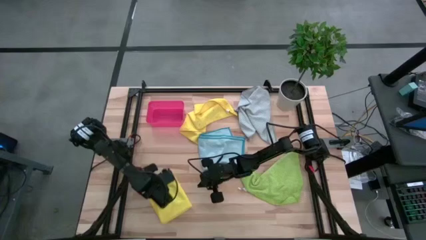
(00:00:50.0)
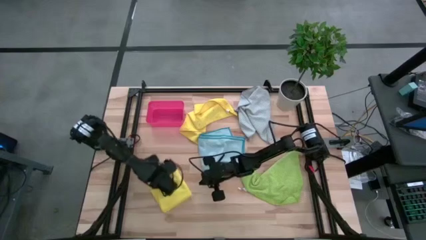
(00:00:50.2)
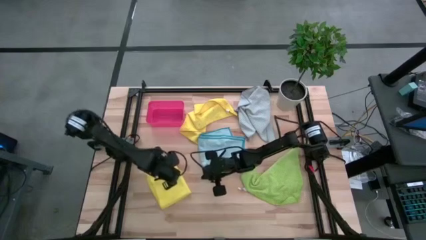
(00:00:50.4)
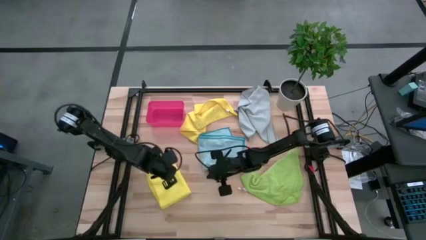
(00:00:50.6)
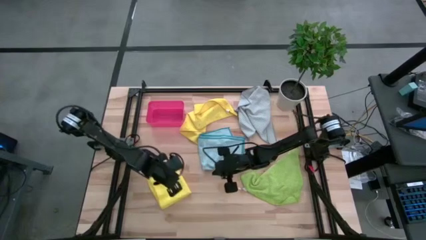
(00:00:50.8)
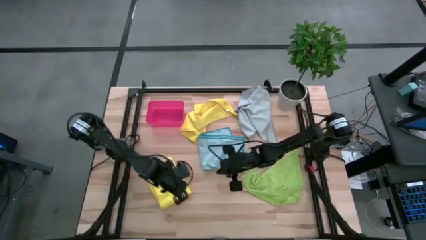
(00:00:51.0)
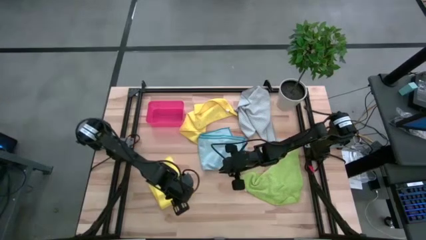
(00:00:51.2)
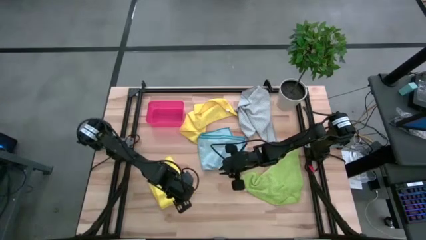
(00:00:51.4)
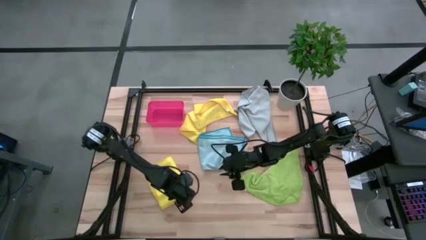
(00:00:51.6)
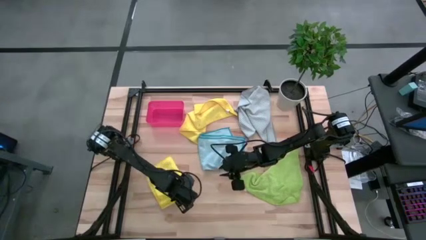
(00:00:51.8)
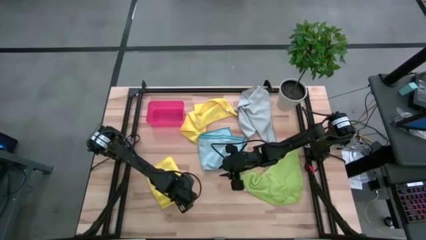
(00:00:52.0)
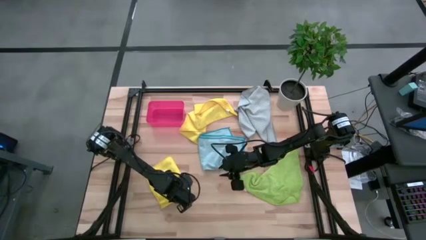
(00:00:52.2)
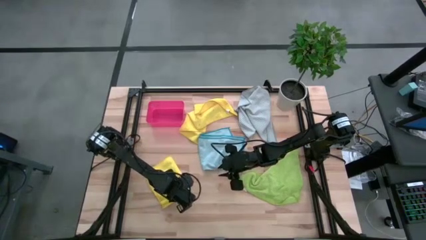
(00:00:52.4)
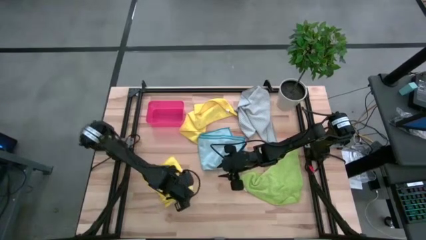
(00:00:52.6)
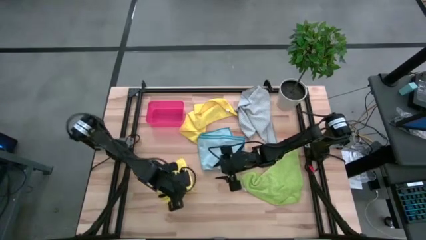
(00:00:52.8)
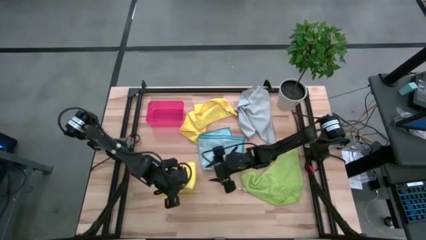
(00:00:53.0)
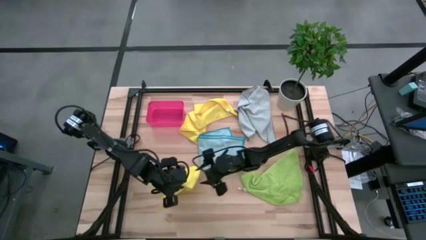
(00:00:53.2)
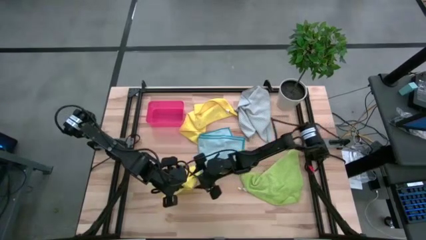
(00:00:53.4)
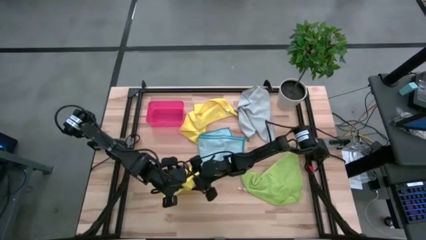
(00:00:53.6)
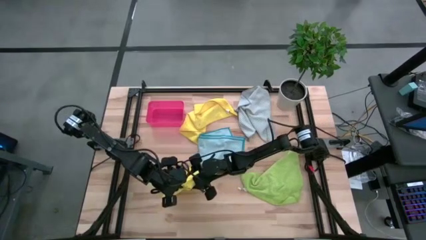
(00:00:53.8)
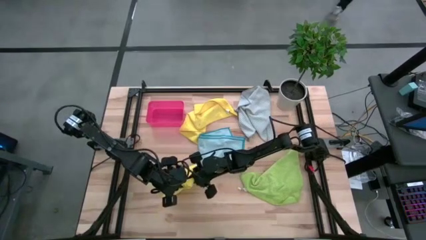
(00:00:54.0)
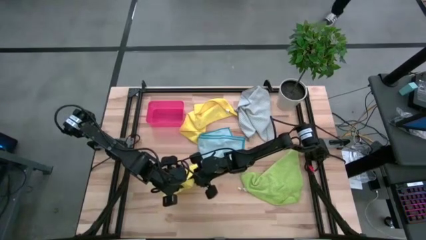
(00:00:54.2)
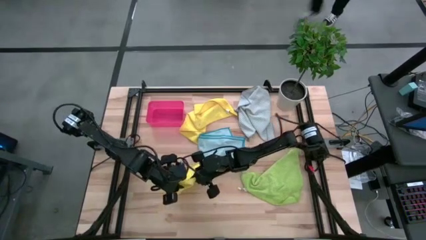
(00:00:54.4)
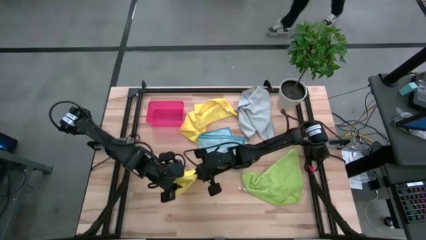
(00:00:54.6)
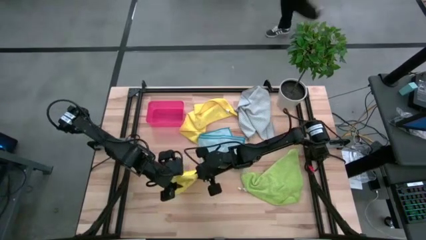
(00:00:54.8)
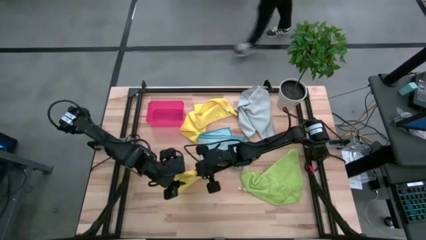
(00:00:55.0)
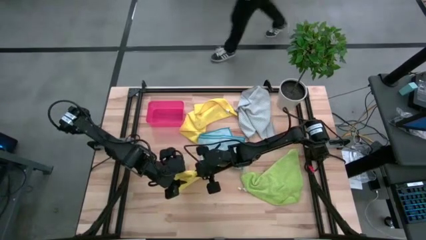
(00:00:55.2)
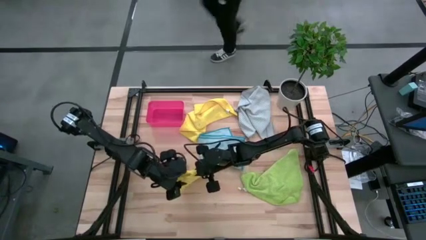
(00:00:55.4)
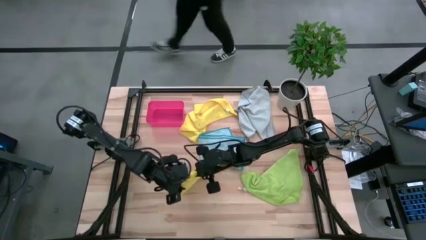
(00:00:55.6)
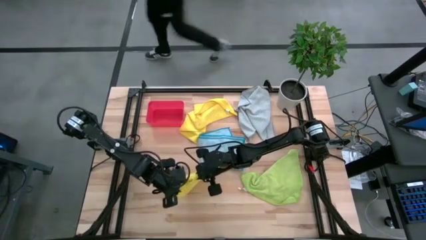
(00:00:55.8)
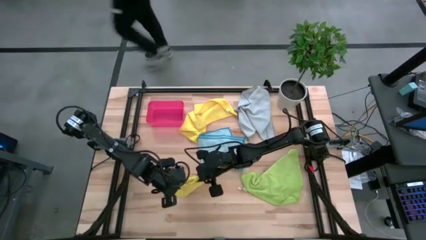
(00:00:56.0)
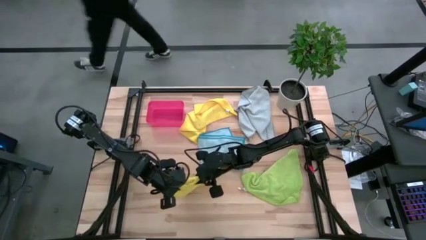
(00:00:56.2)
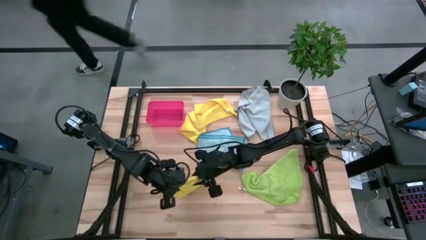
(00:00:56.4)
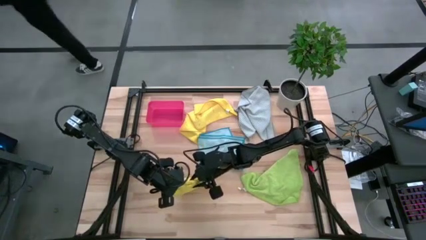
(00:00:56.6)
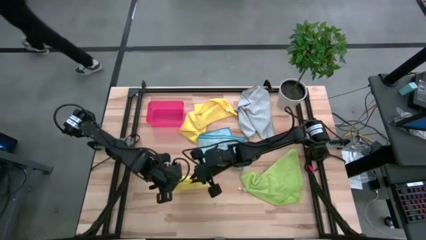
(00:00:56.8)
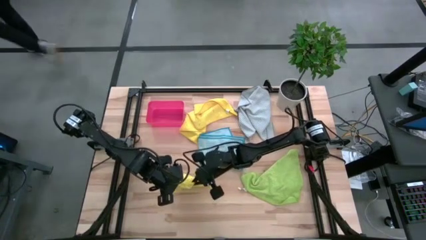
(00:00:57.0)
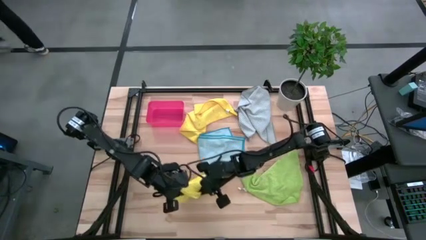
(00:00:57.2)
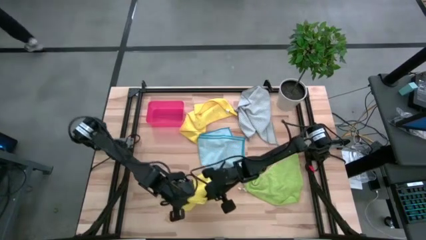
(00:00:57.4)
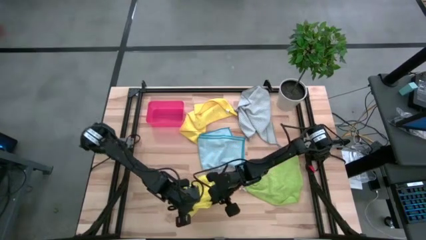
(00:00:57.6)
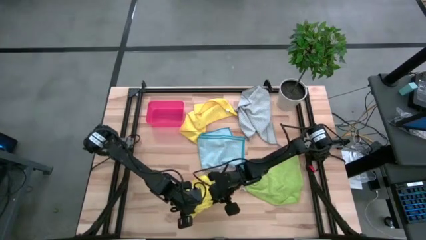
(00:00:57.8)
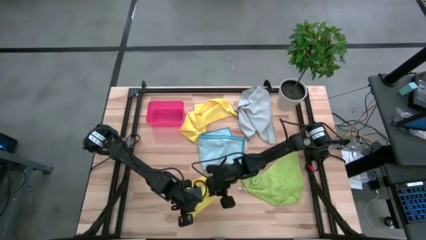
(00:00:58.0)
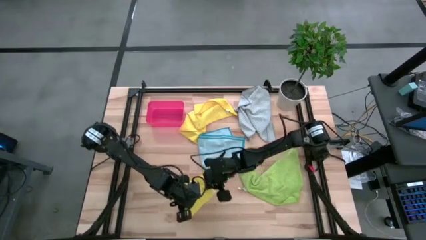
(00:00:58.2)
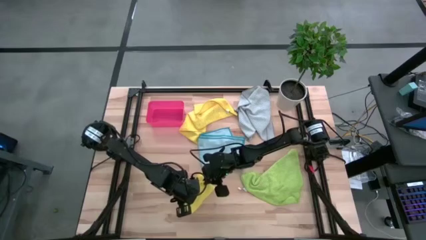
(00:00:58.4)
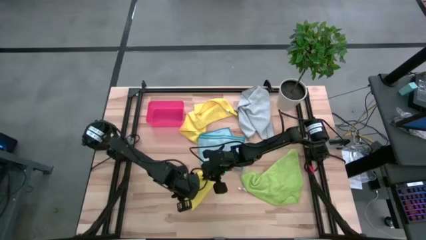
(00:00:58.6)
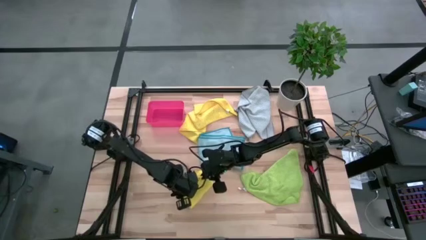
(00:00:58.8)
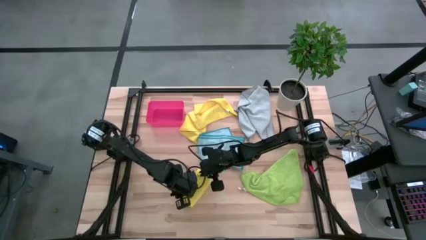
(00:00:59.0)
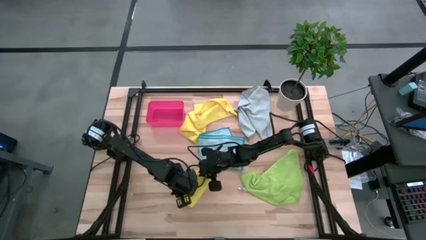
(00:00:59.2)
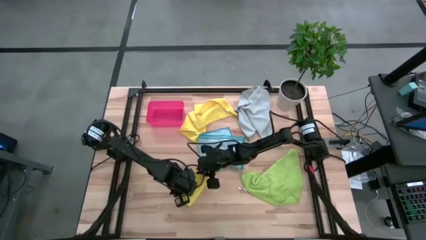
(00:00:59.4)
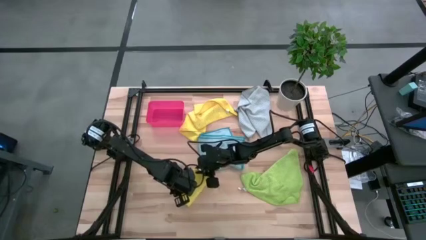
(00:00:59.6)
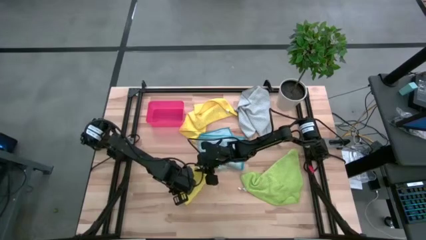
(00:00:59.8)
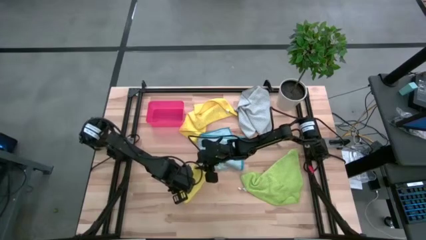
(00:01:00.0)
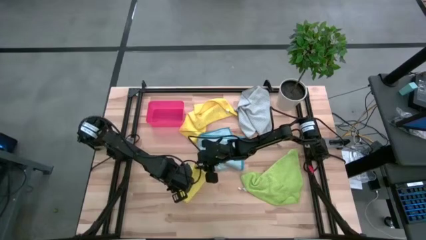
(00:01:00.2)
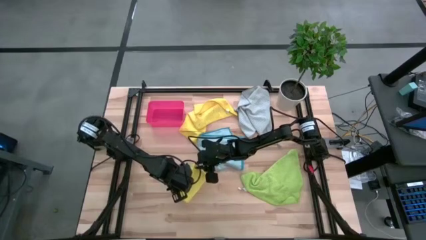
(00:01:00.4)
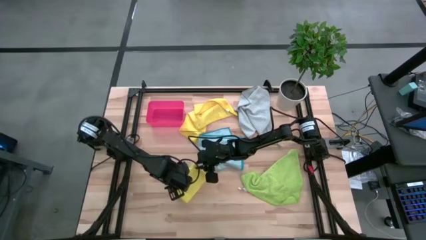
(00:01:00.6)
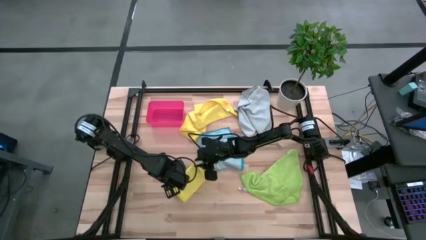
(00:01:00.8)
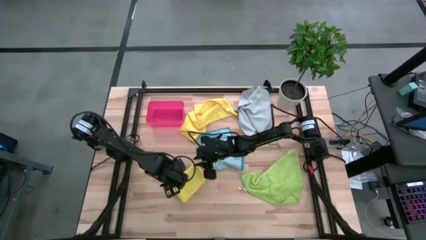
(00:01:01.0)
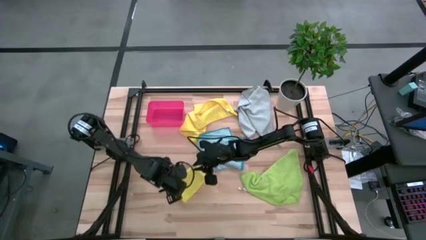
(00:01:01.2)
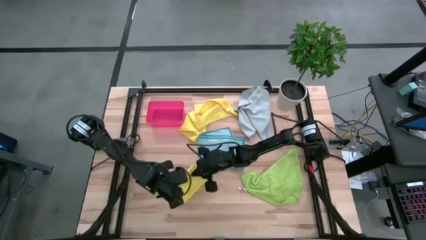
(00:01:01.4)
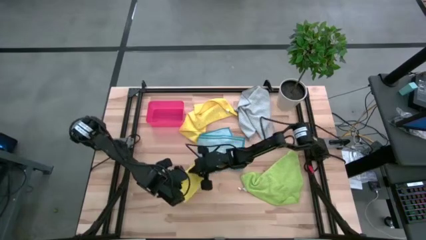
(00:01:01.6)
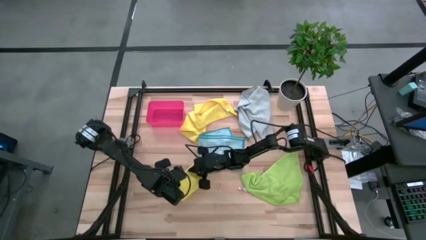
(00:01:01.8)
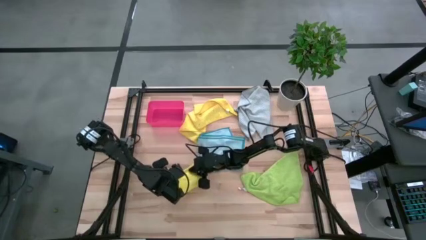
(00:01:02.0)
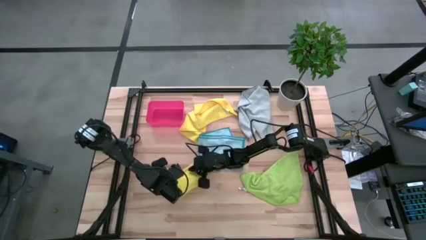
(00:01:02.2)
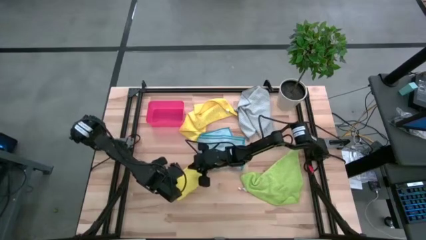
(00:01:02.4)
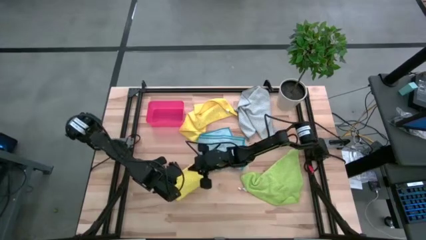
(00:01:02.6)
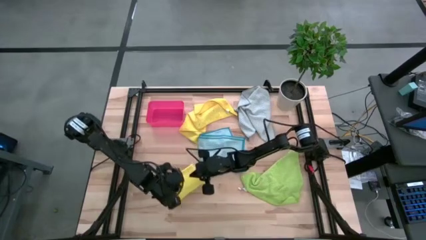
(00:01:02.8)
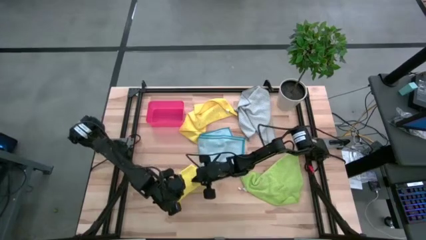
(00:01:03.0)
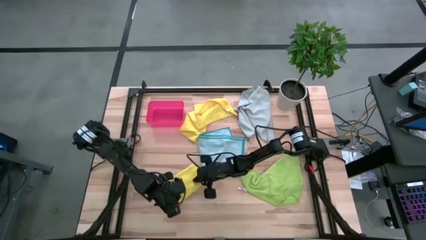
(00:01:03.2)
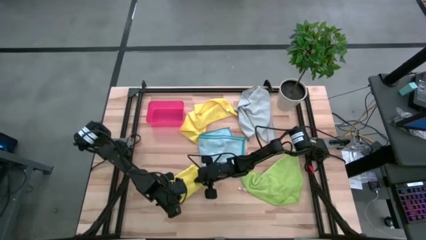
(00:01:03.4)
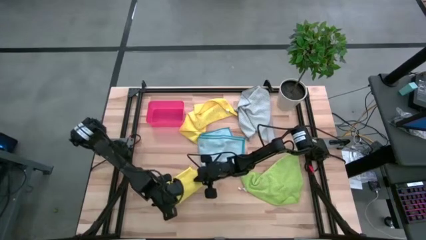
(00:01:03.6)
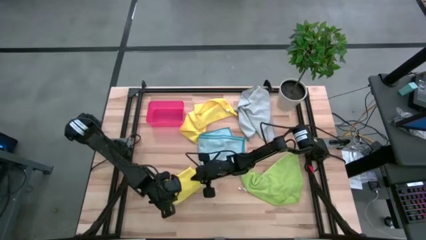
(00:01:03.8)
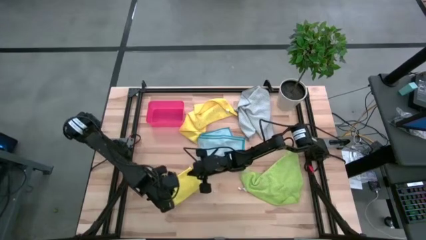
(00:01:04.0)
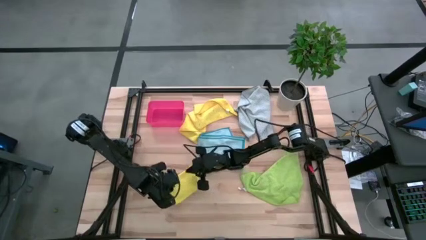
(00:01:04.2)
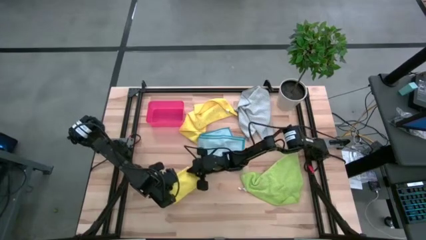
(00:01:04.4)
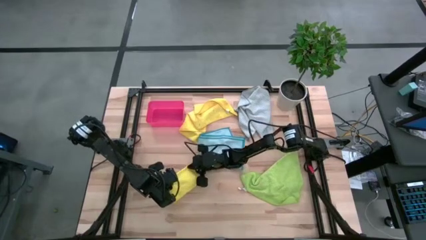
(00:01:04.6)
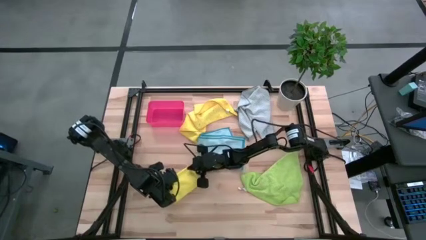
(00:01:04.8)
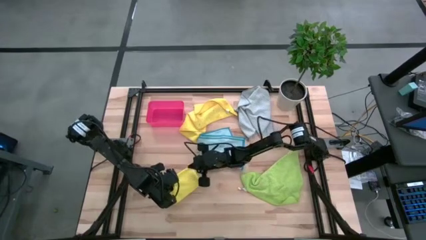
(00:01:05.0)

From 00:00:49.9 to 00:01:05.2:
Task: Fold microfiber towels
Fold the bottom yellow microfiber cloth
